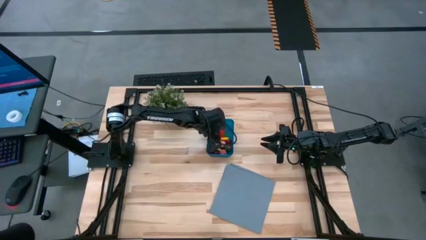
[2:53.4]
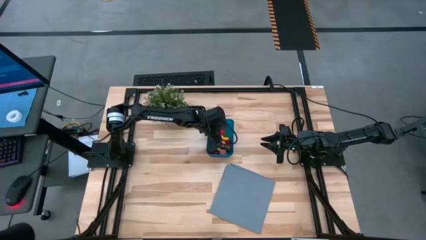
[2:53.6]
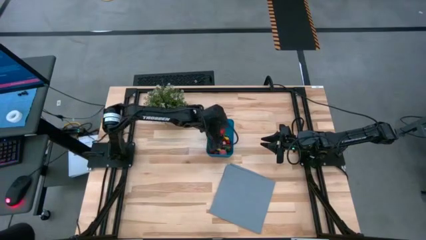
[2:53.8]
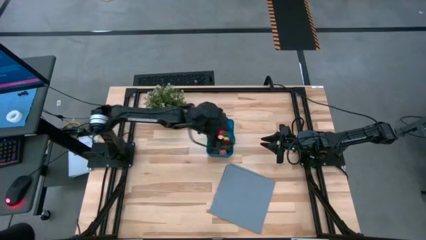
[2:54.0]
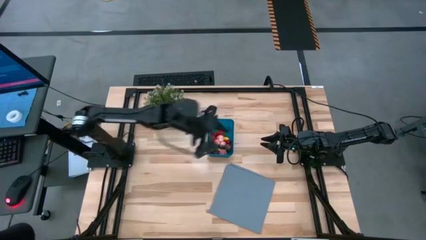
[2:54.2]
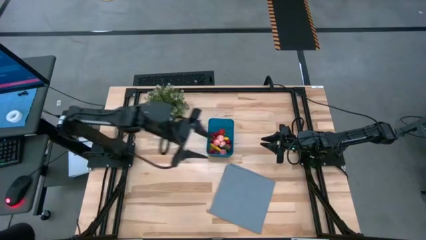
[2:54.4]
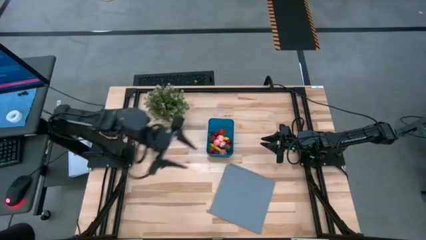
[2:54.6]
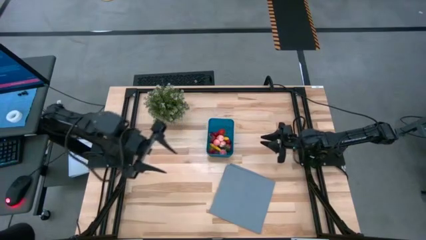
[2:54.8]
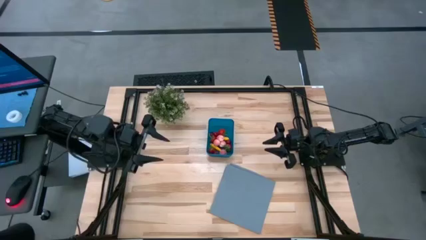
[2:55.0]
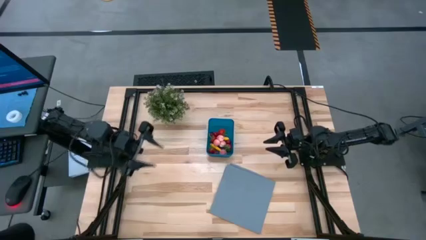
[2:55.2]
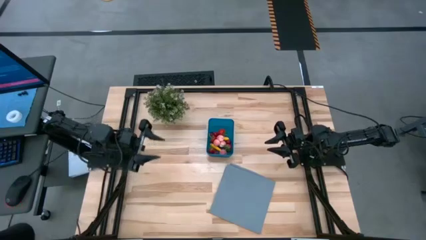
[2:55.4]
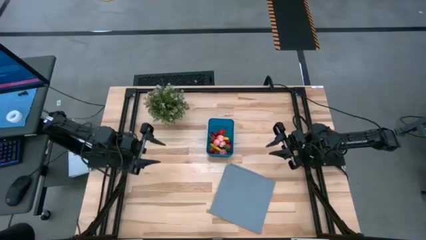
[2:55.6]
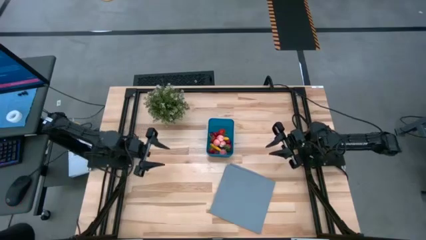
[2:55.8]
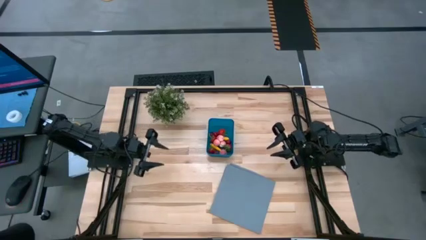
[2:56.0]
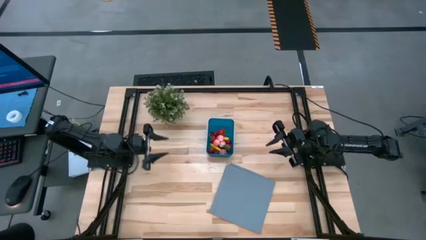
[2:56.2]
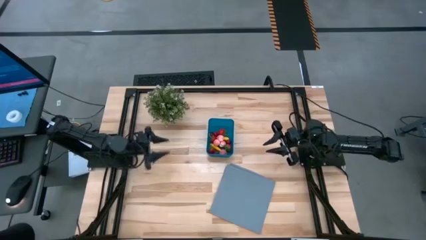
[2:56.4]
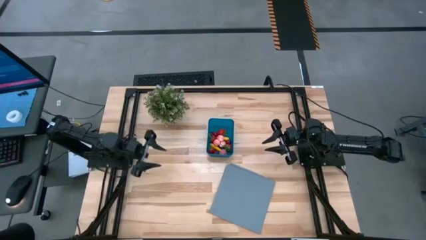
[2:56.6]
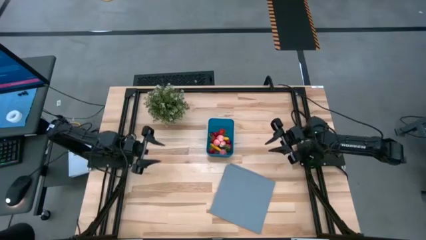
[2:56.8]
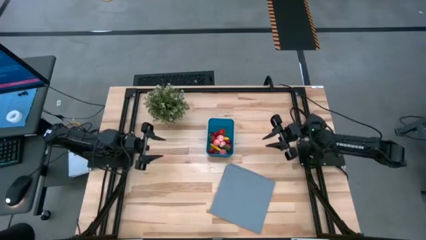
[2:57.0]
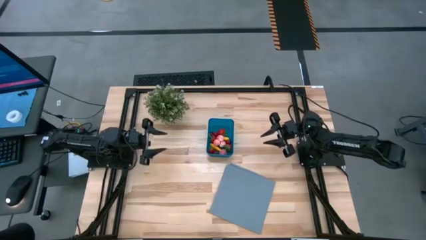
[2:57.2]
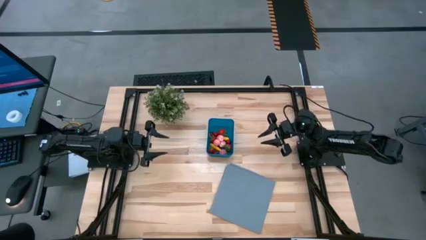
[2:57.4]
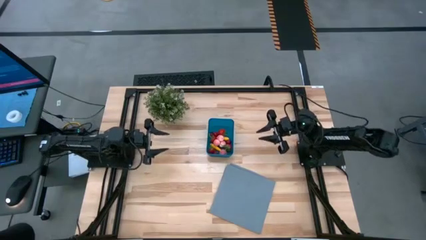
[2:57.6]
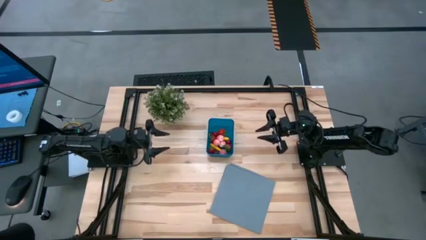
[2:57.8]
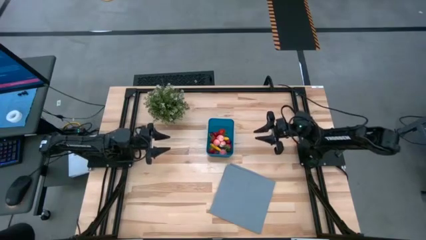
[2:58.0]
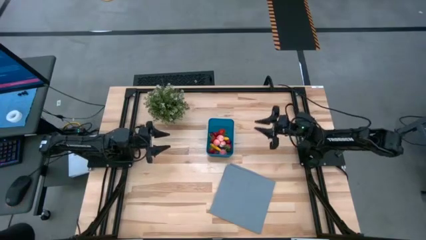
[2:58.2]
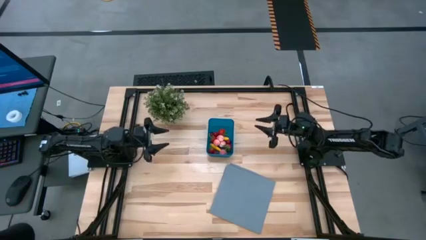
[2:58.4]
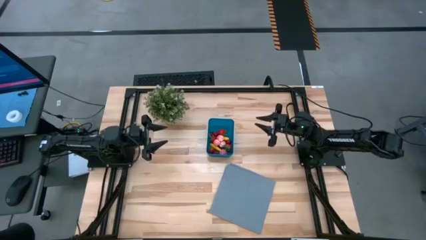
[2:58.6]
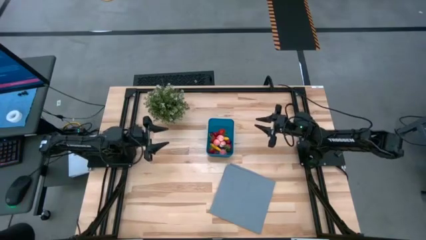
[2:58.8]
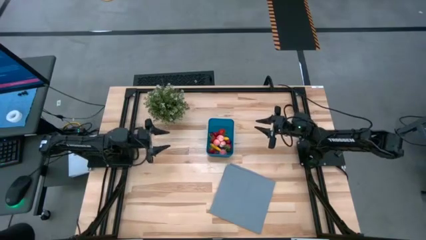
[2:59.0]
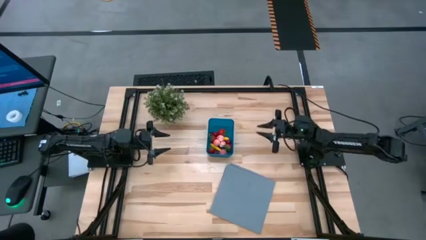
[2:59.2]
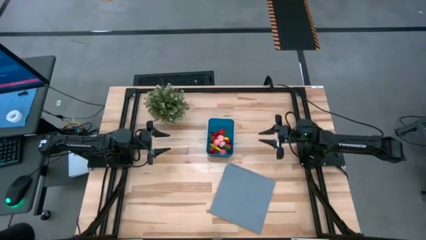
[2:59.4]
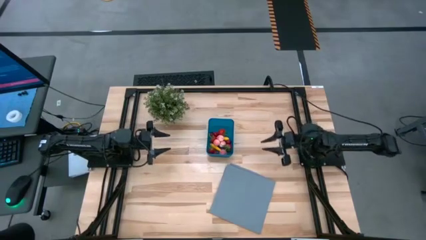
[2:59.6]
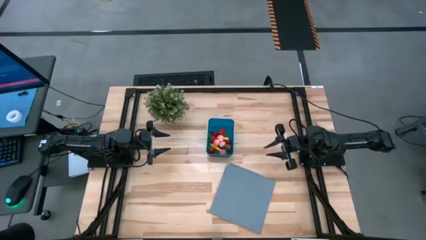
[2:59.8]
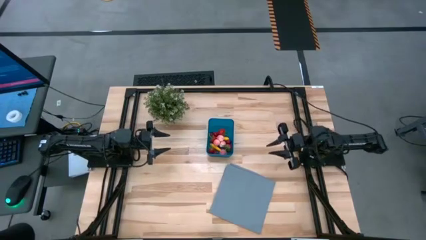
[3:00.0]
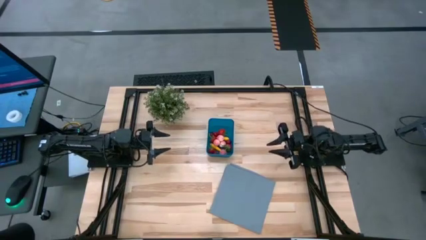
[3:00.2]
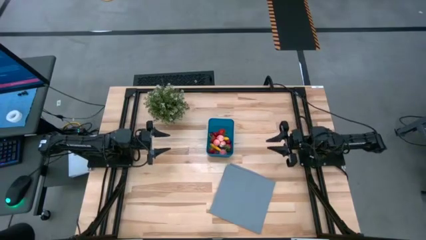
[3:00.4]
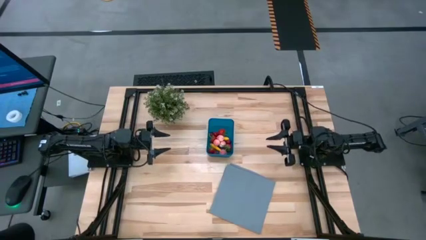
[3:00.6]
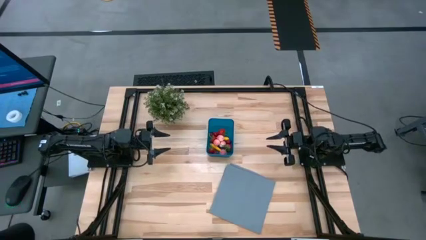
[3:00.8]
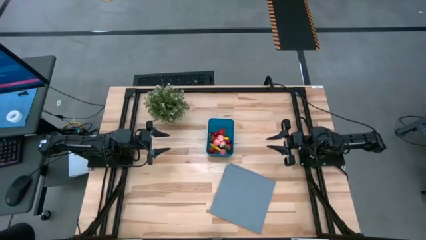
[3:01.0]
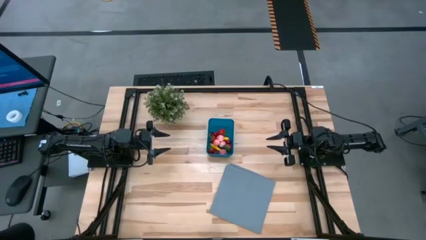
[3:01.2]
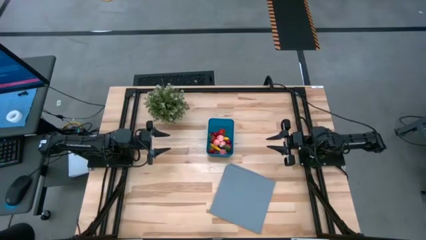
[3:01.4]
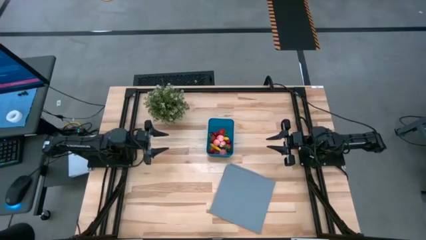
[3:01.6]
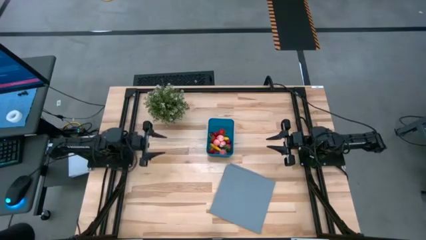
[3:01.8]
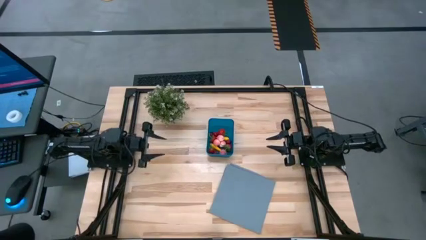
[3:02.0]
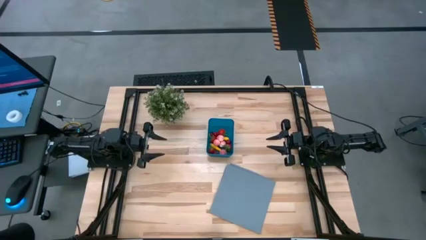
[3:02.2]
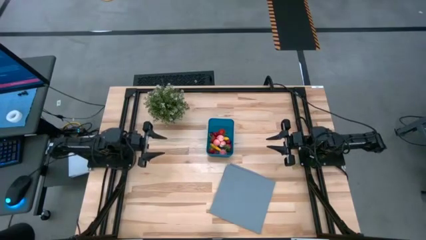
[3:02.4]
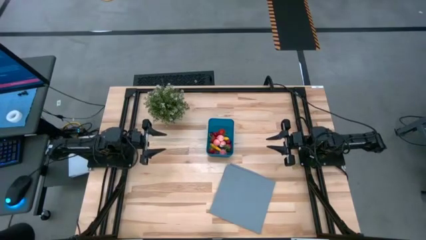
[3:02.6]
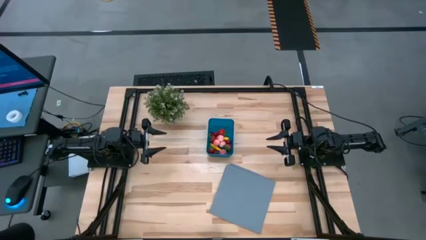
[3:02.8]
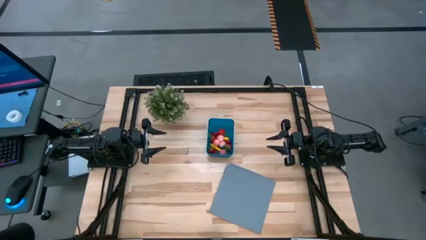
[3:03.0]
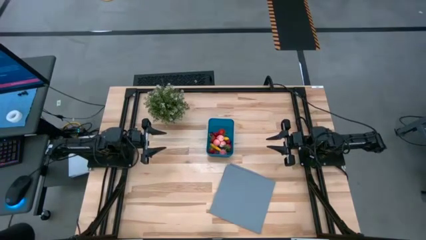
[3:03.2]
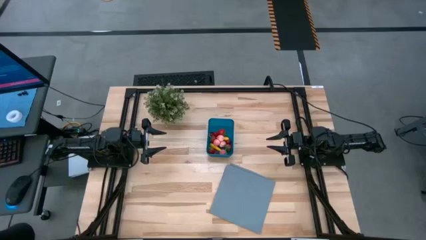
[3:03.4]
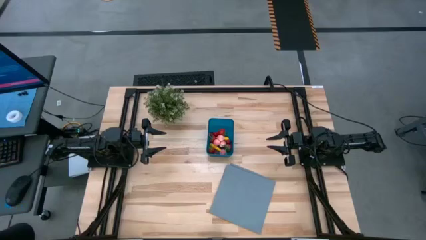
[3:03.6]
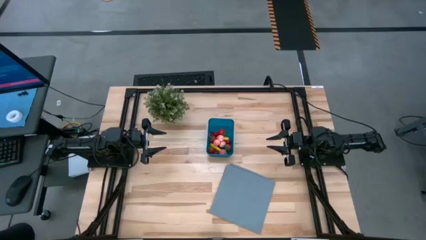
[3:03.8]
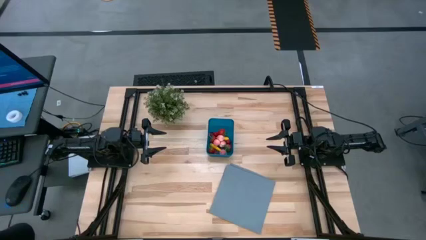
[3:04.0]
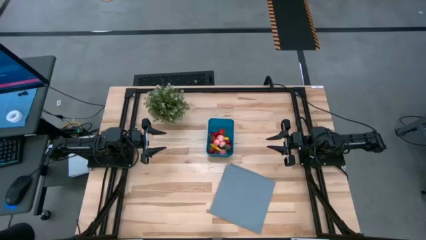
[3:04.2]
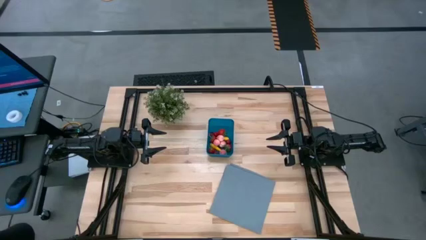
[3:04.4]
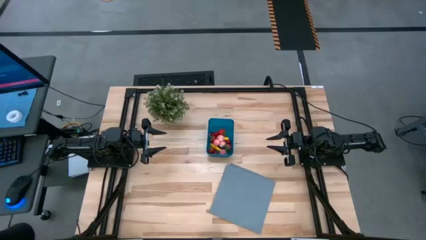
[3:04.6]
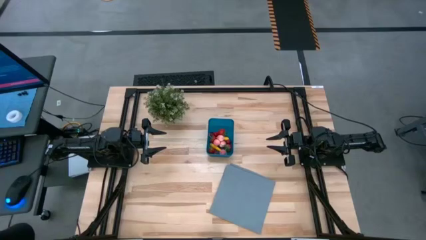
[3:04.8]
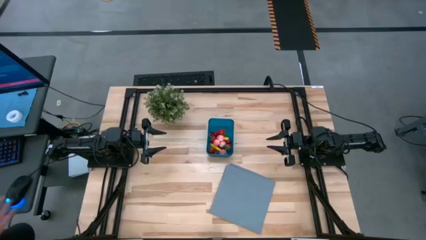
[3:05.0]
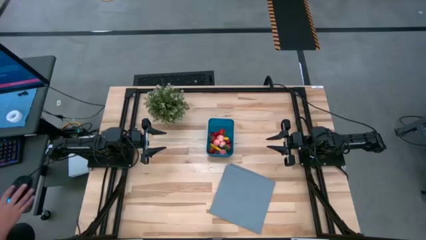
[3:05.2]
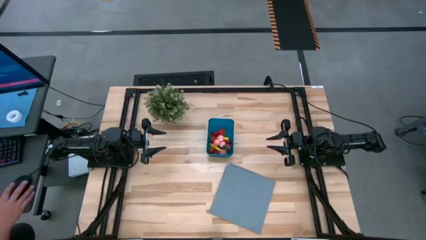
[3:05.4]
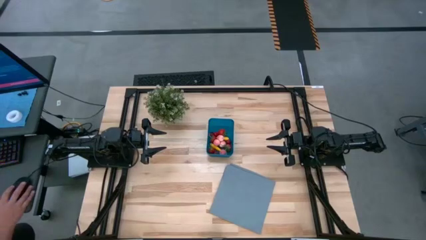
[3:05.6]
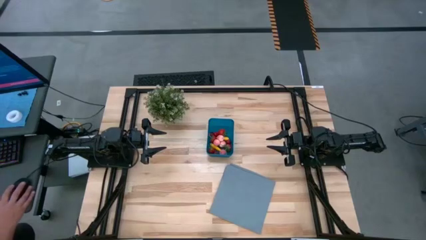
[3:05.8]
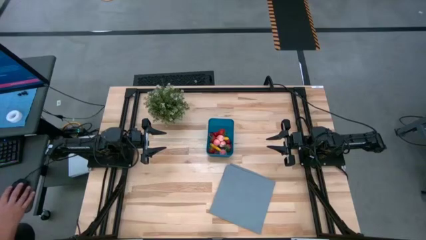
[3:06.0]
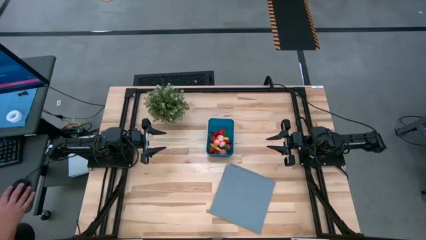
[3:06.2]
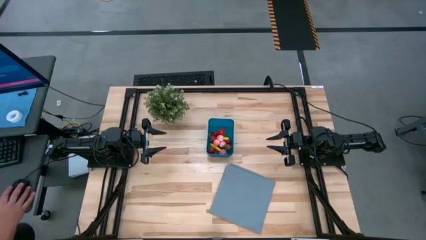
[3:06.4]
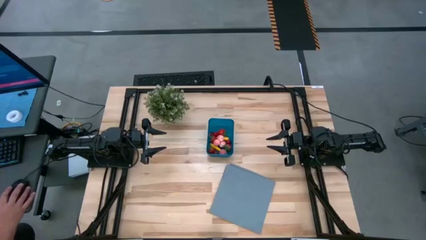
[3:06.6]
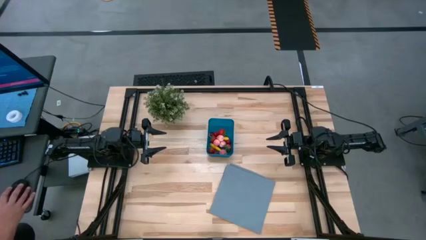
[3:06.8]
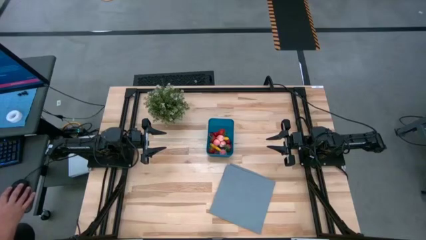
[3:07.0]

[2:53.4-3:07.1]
Task: Pick and placing Produce into tupperware
Return to Home Position
